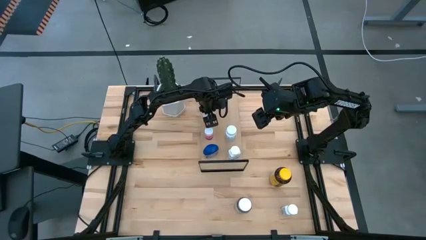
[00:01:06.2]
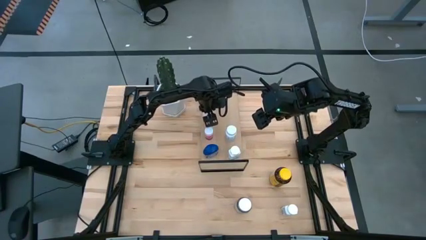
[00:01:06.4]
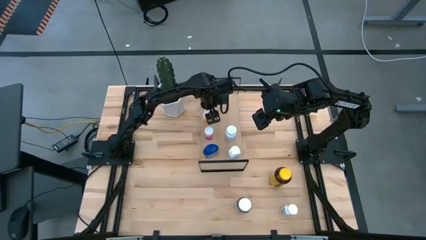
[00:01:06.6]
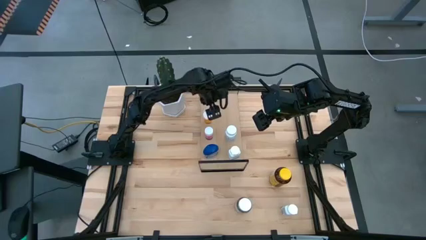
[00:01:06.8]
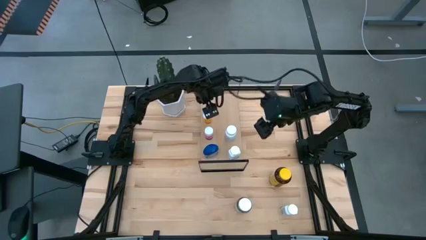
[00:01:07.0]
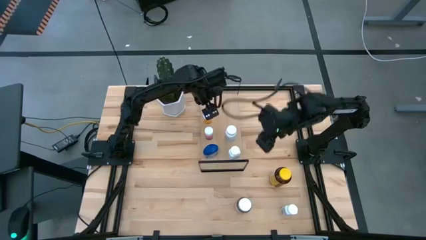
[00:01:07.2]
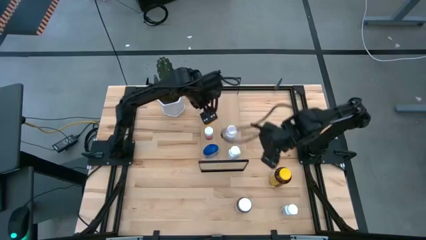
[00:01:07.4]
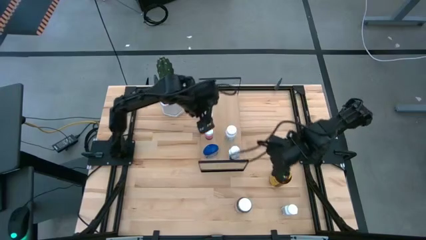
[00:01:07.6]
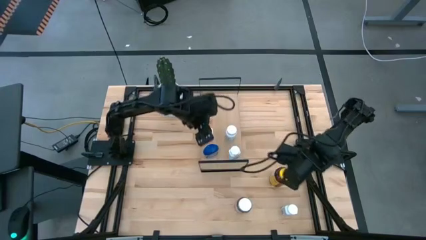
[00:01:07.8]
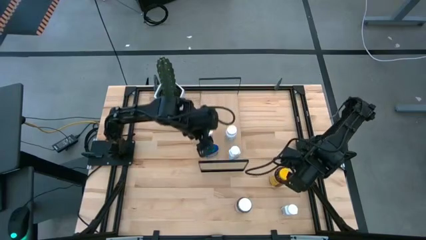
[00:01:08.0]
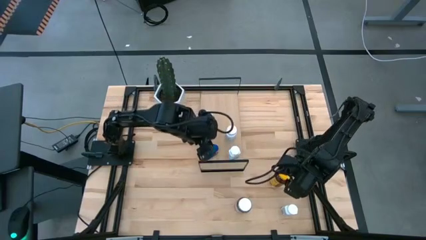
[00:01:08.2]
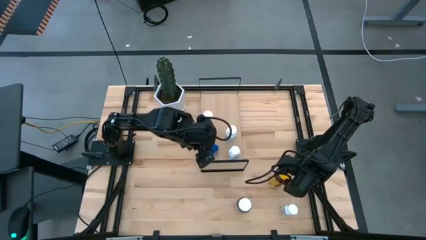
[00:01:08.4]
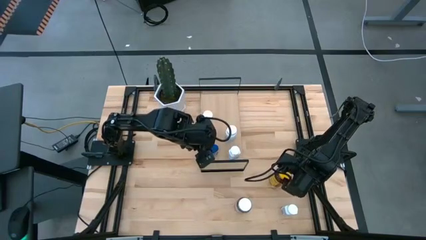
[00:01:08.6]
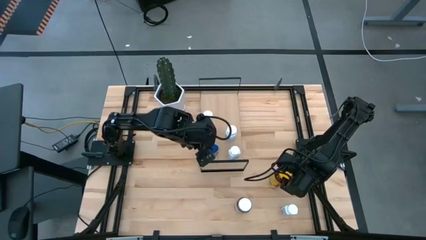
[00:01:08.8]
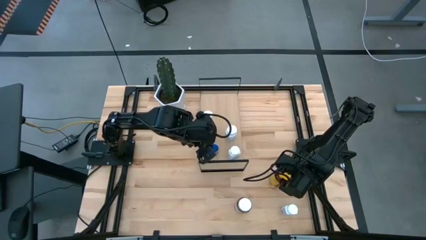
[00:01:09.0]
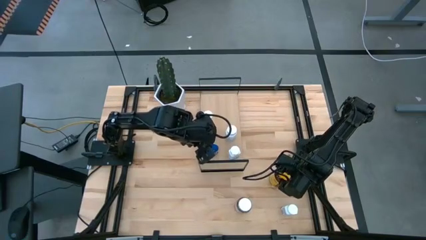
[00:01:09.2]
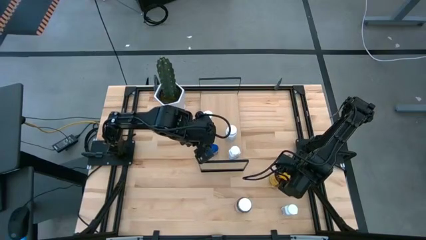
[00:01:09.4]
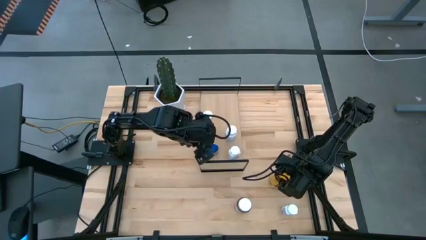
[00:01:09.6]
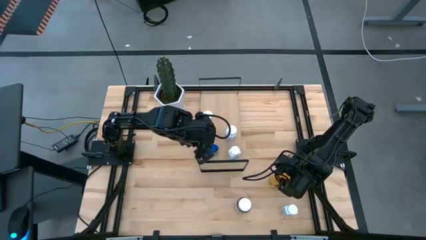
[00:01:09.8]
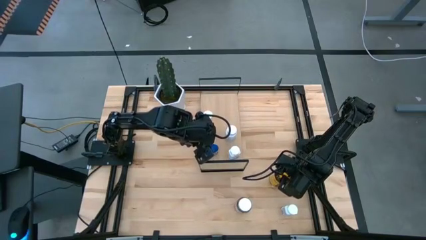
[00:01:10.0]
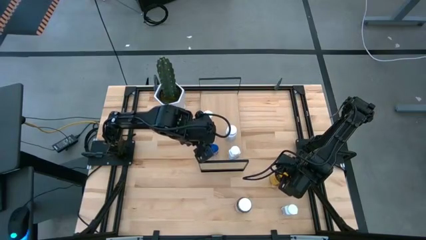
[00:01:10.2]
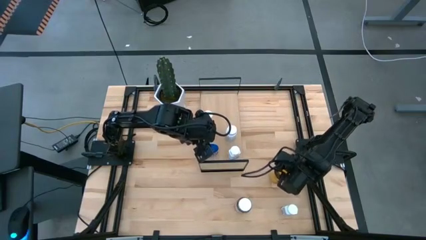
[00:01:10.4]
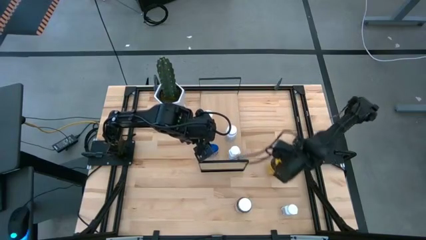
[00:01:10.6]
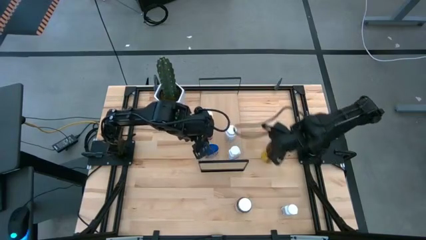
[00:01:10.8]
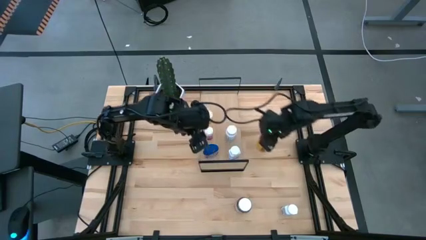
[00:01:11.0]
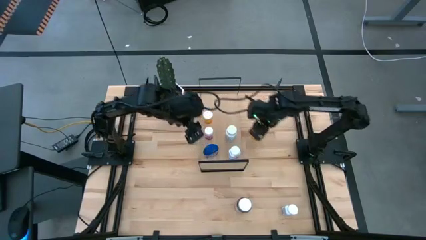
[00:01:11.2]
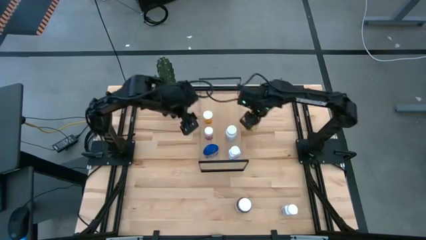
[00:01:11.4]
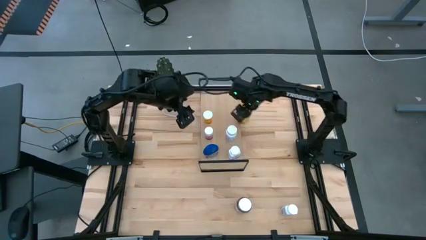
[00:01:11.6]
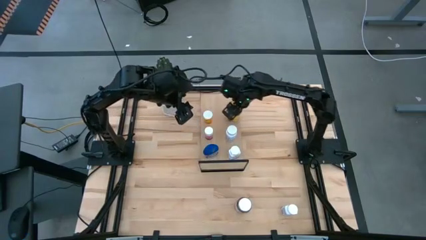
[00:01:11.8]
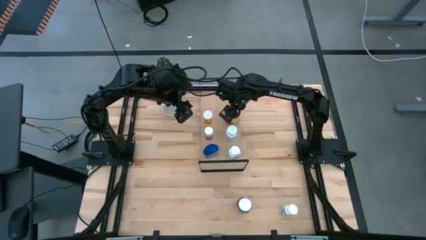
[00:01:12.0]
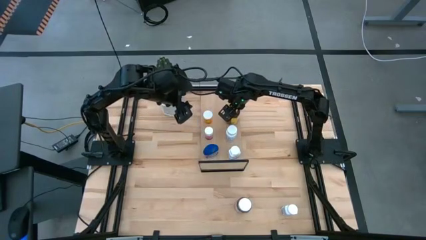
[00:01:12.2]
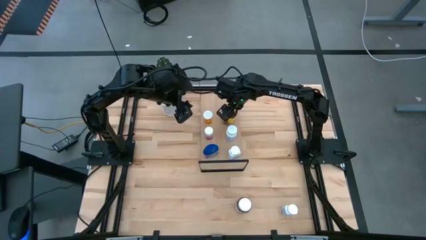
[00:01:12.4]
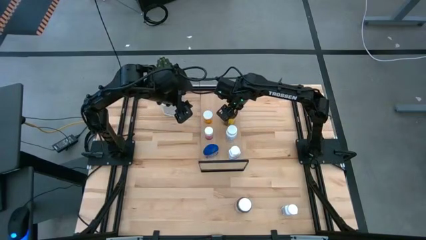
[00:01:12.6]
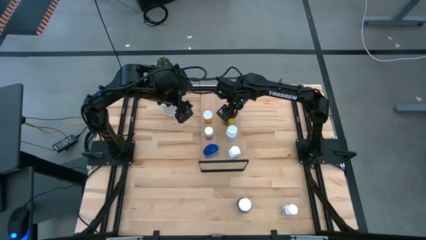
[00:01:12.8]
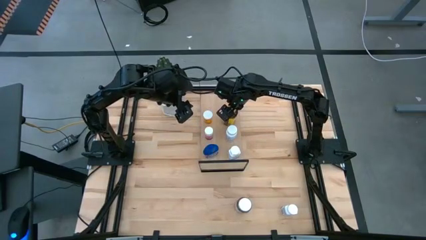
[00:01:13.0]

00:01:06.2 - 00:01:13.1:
Task: Pick and place medicine bottles onto shelf by color
Put the yellow medicine bottle on the shelf

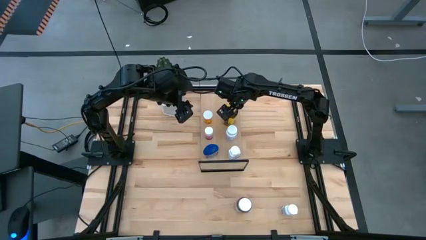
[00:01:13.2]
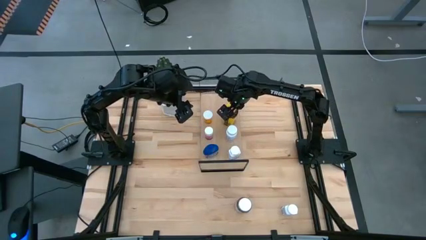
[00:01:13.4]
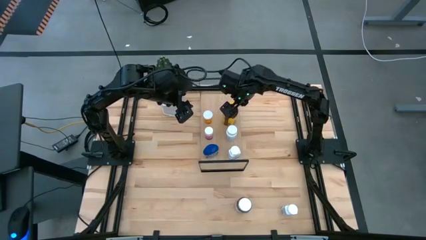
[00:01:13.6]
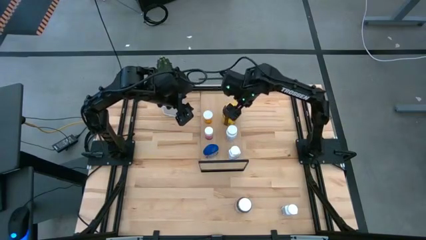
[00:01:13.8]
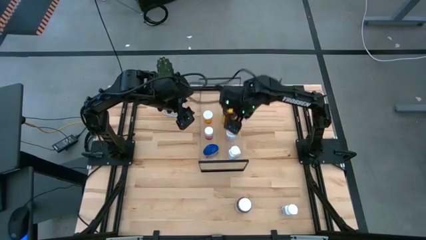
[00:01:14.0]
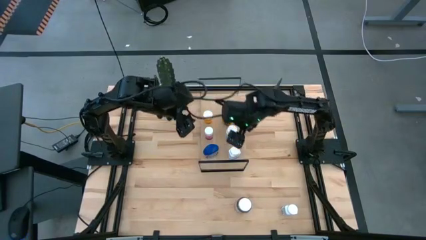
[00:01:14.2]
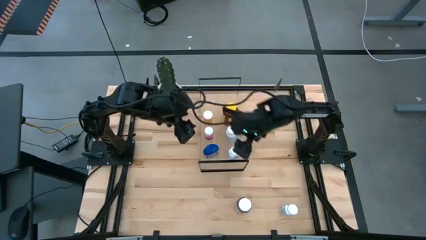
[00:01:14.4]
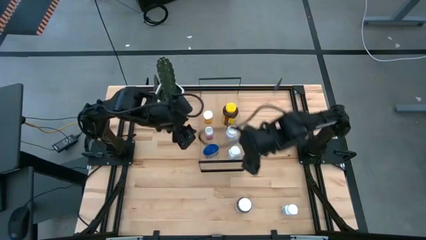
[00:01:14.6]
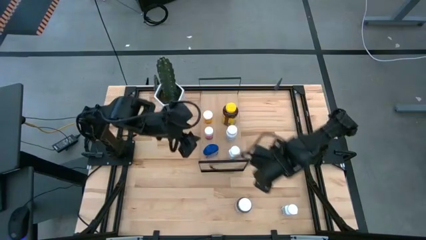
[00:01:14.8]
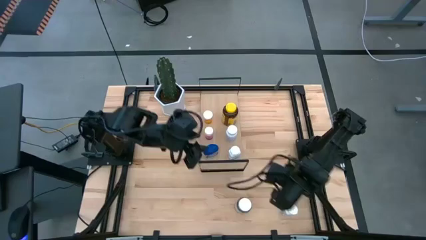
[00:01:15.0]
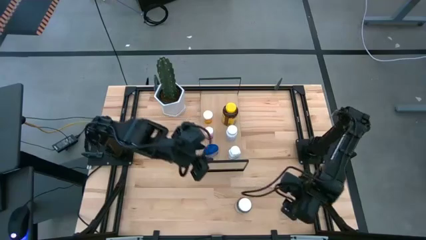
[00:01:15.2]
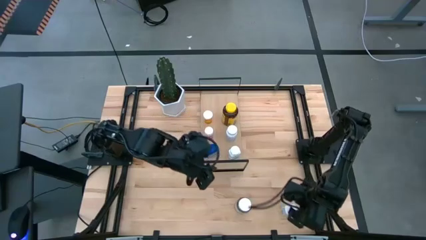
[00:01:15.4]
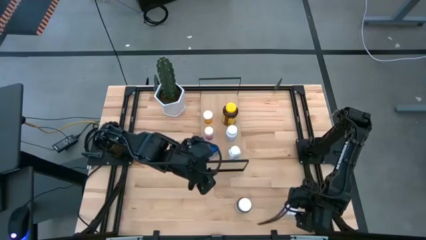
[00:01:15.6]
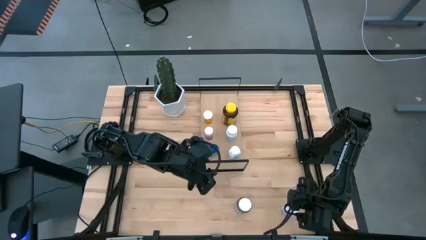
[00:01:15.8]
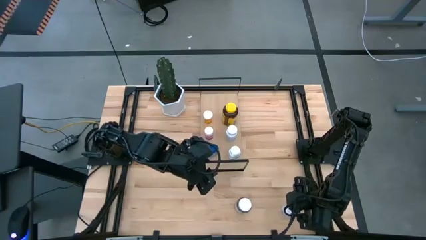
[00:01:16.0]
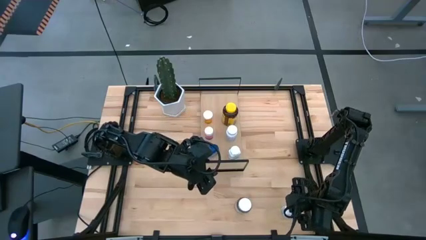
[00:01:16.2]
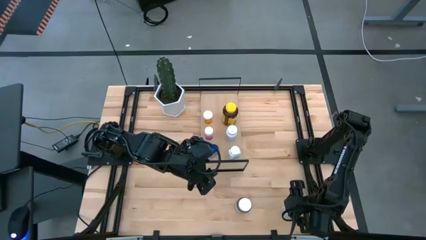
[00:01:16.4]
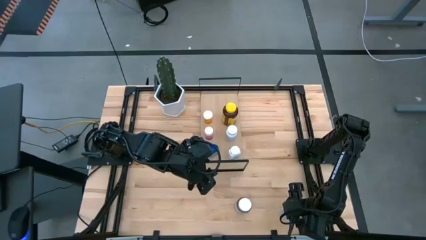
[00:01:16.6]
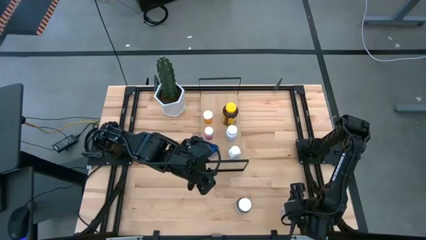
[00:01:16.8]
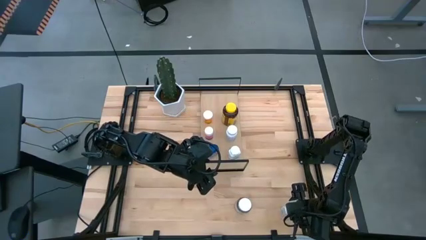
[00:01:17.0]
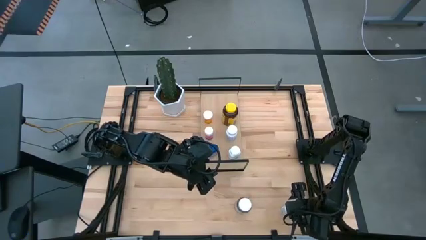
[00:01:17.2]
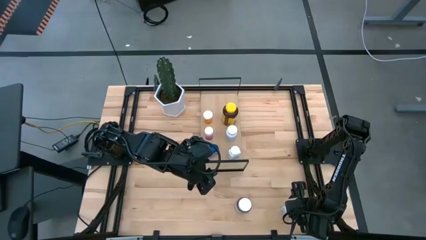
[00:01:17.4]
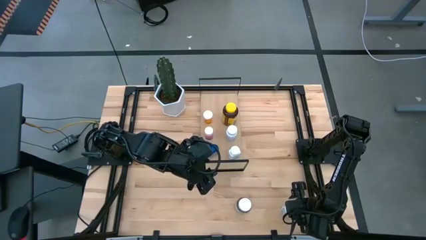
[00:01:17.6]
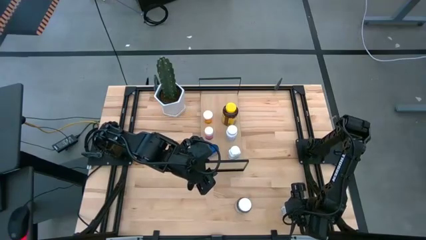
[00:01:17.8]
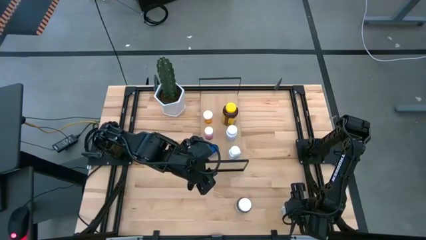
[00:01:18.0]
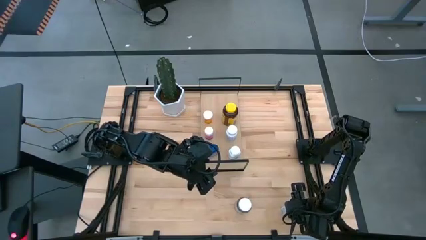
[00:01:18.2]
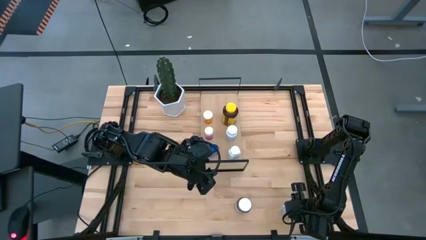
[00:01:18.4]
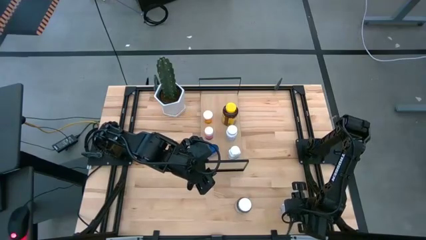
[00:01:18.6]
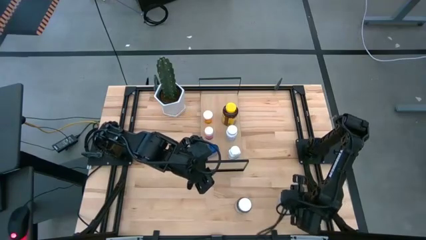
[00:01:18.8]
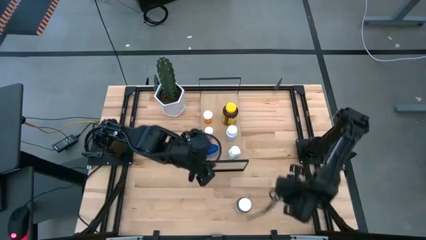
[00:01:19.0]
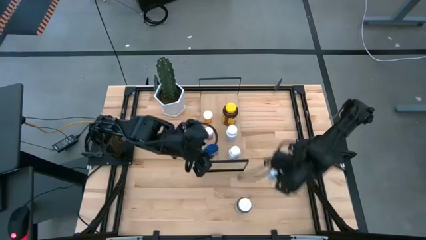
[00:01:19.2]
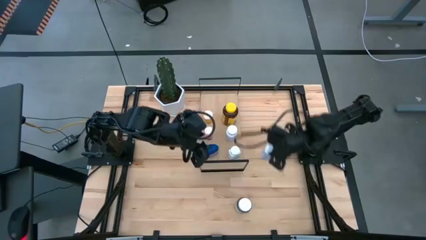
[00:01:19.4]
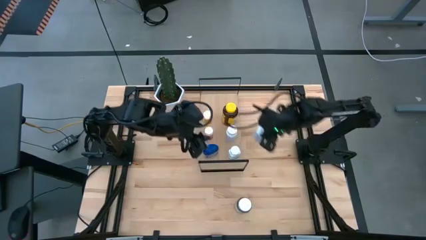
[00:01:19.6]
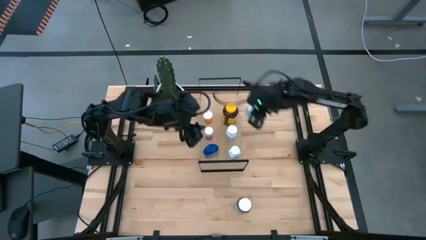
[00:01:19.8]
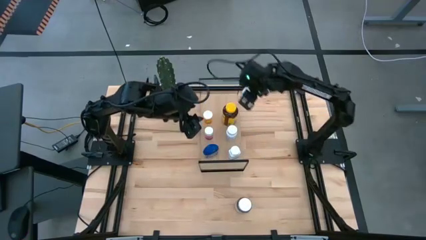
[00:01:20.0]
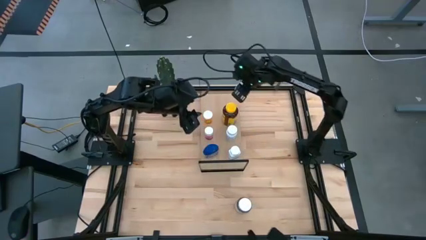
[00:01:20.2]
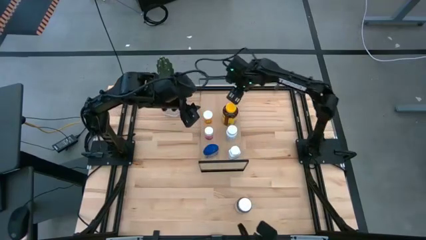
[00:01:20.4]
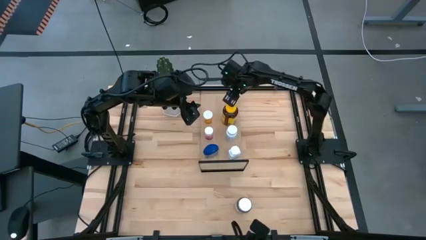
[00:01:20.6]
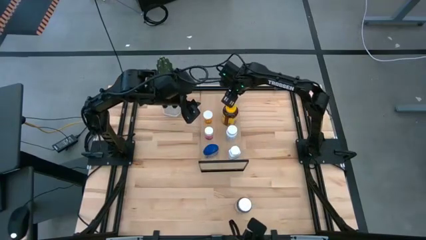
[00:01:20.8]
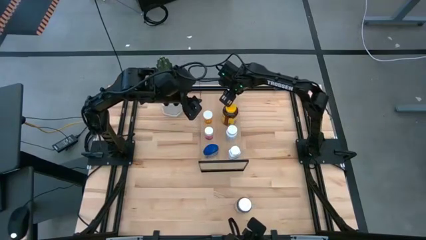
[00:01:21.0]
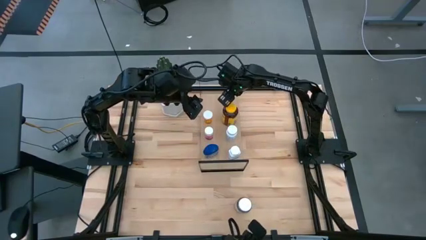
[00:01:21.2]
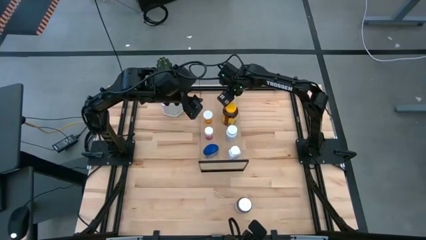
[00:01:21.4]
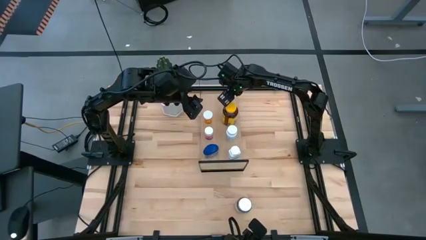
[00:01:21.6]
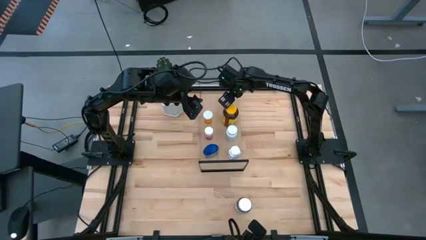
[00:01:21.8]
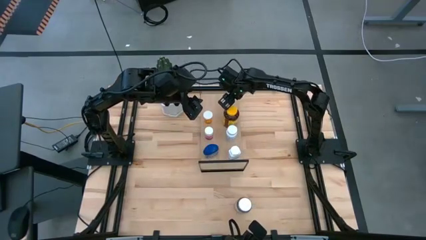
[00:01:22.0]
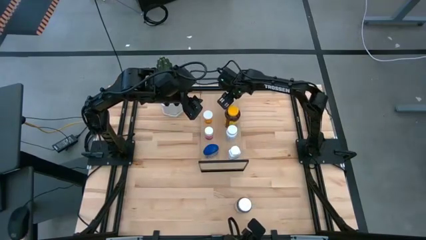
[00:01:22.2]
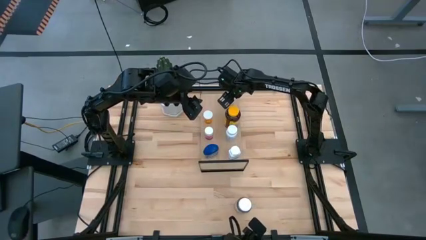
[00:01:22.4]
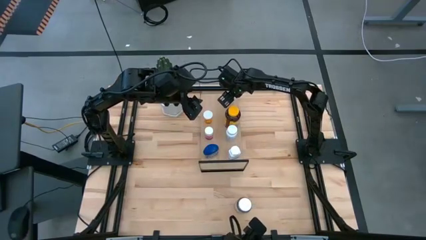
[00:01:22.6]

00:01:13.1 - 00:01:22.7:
Put the white and blue medicine bottle on the shelf
